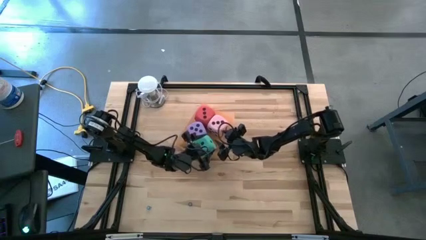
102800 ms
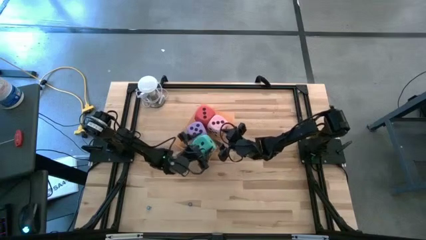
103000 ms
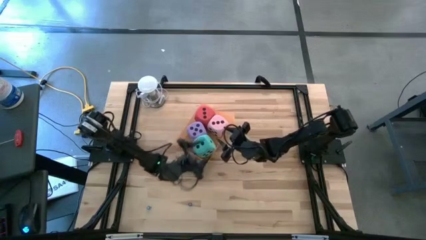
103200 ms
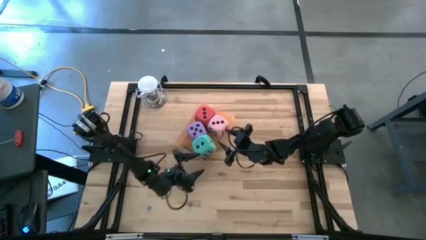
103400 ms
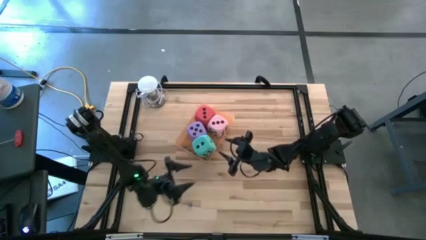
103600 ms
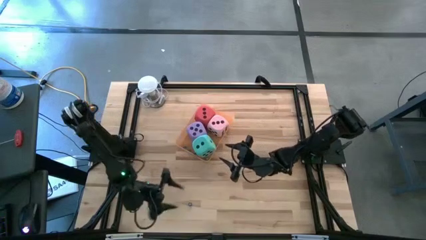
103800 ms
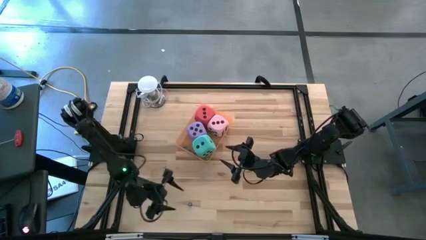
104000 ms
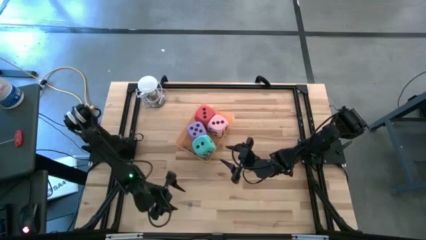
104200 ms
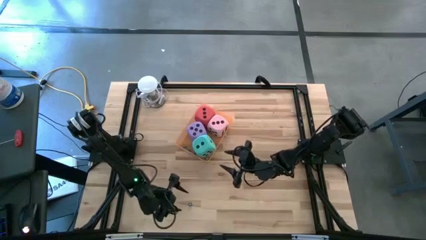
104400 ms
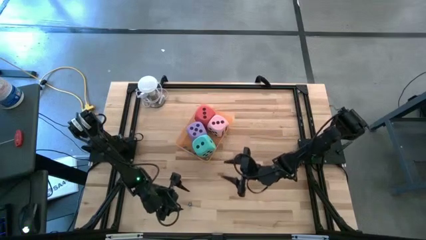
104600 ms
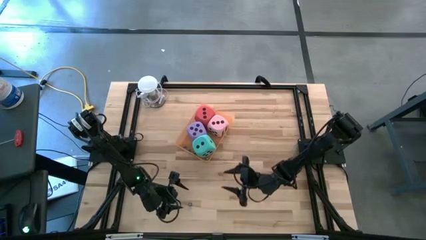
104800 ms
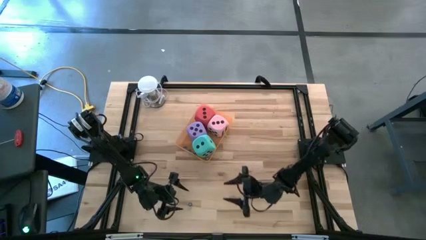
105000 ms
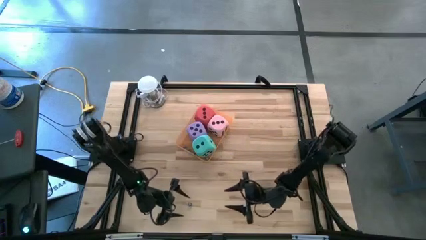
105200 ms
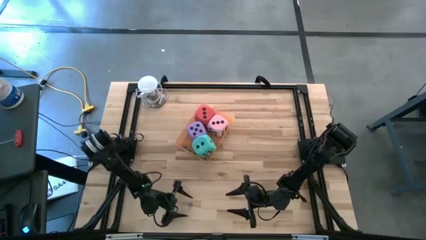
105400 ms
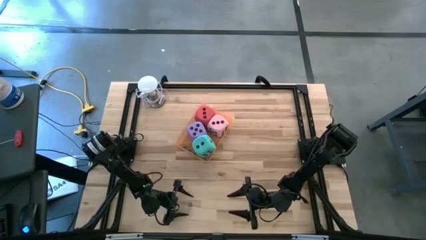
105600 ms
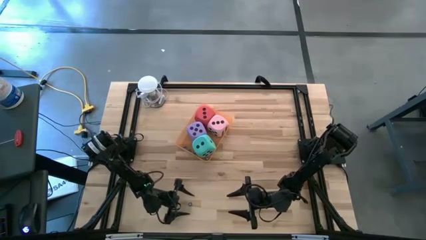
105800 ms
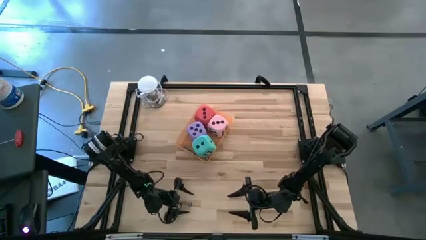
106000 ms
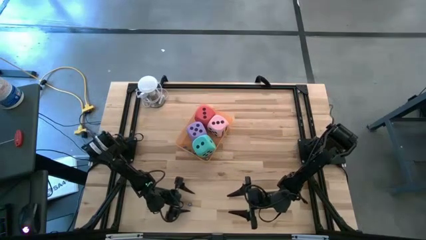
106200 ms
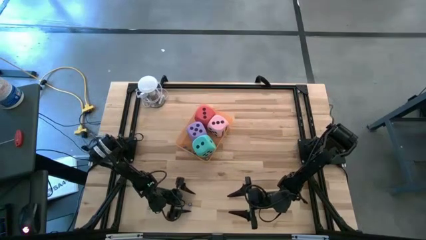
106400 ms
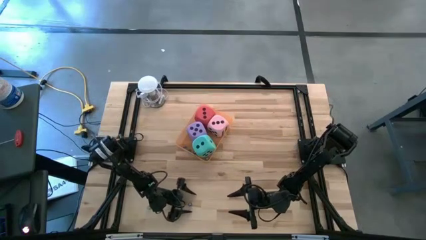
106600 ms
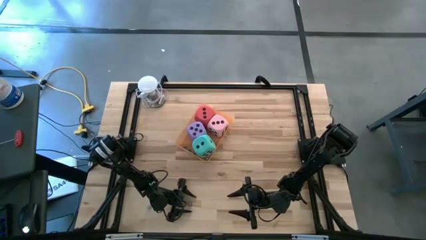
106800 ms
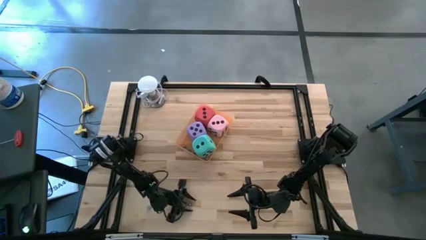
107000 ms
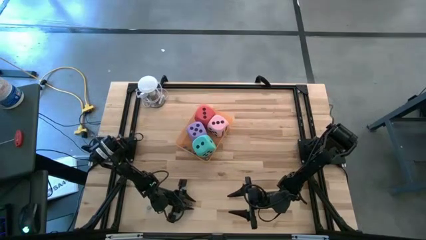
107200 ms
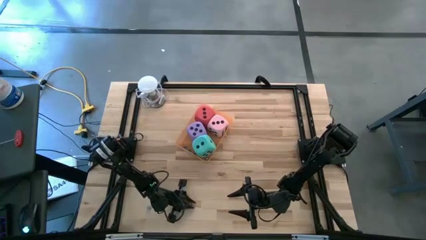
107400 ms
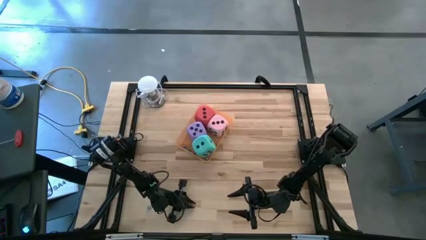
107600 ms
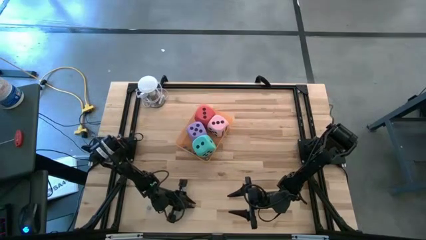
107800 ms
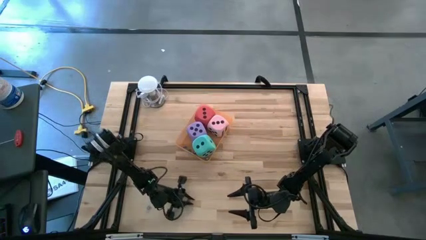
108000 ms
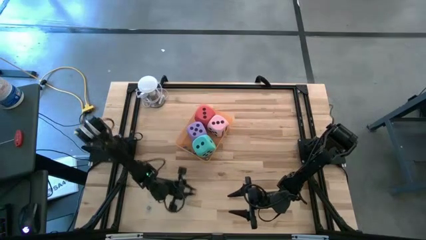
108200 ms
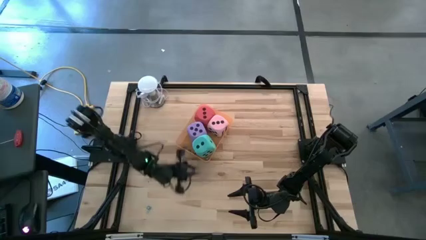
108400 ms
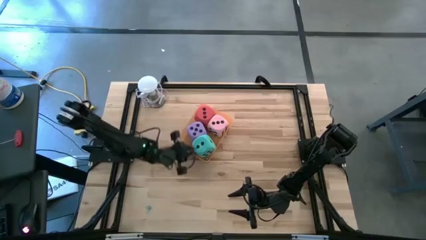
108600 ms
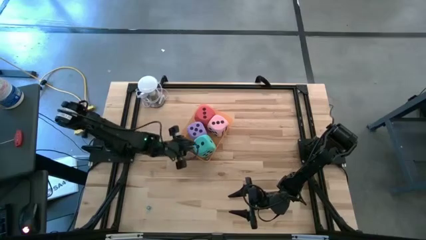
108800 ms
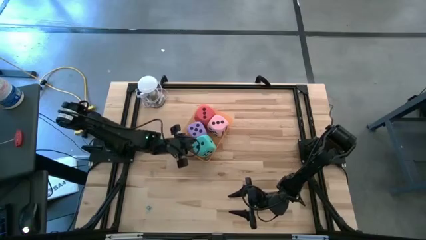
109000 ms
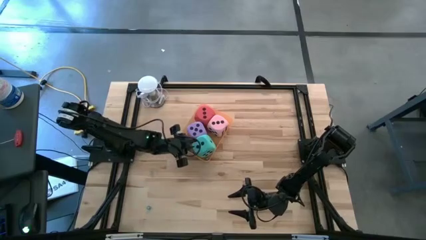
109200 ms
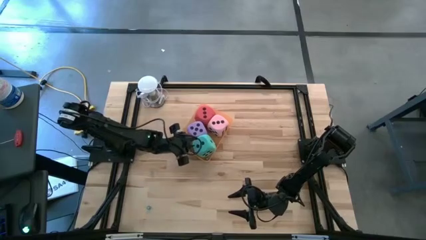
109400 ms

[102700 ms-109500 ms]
Task: Pick & Place Dice
Put the small dark blue die into the orange bin

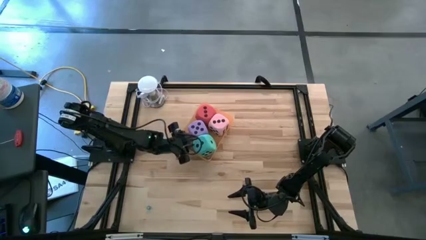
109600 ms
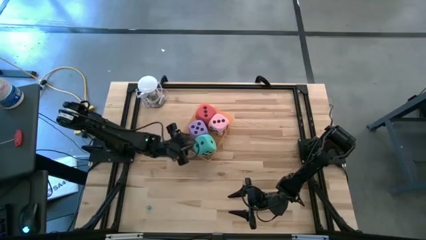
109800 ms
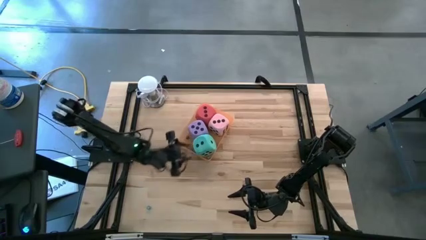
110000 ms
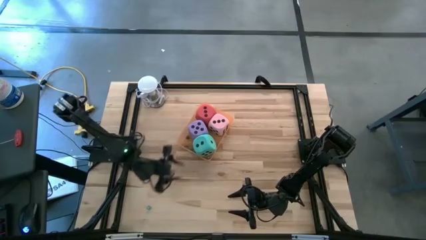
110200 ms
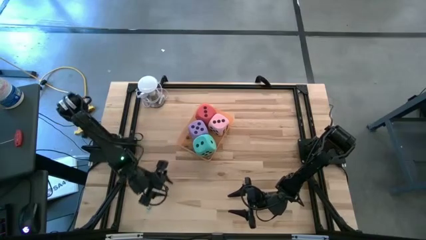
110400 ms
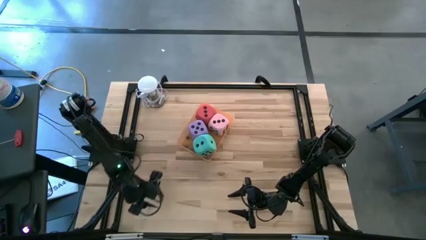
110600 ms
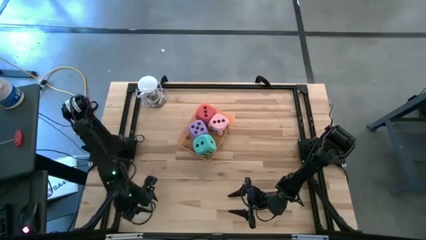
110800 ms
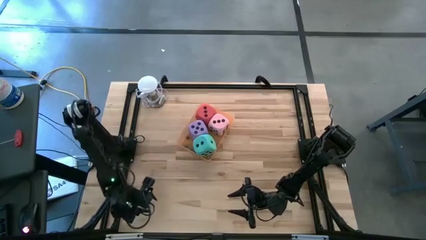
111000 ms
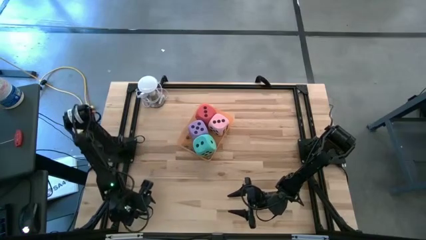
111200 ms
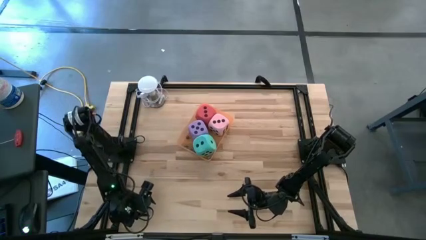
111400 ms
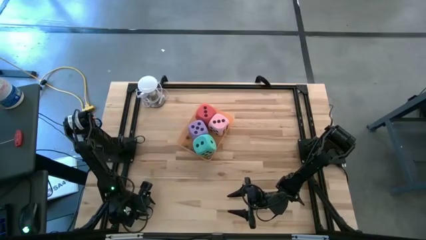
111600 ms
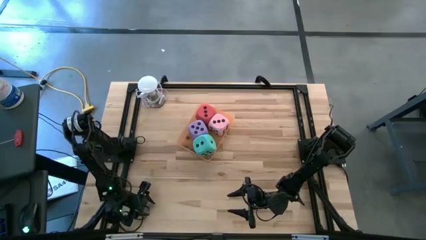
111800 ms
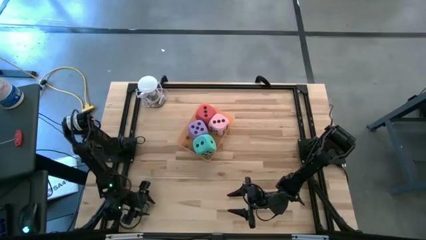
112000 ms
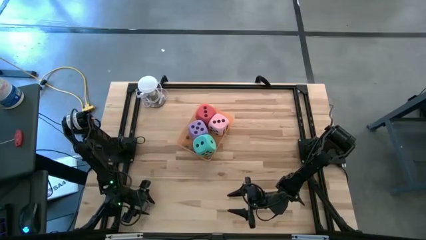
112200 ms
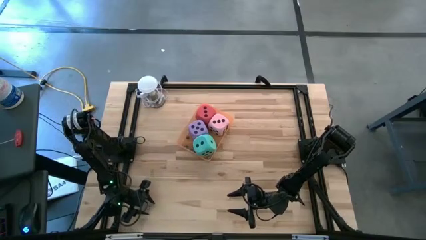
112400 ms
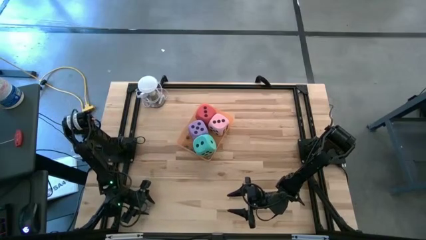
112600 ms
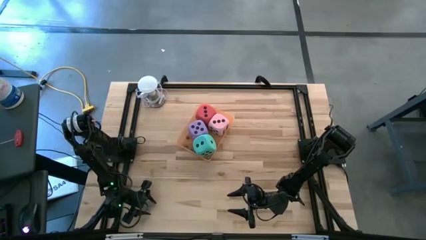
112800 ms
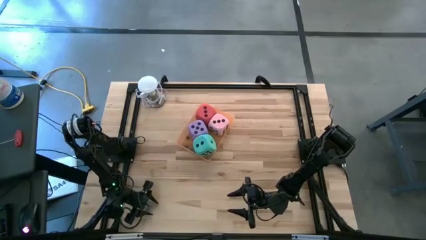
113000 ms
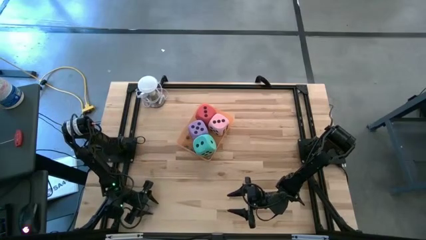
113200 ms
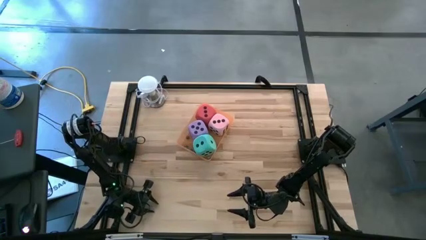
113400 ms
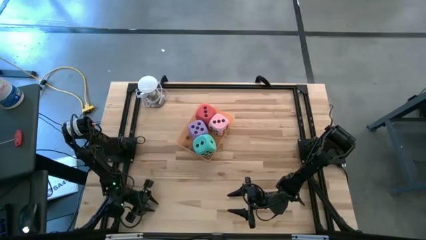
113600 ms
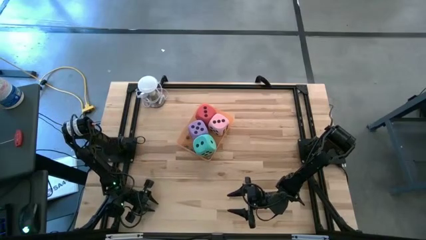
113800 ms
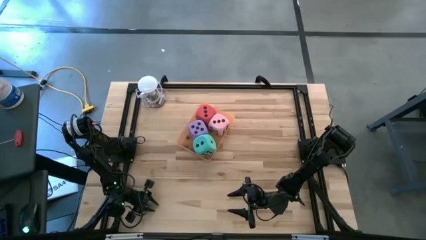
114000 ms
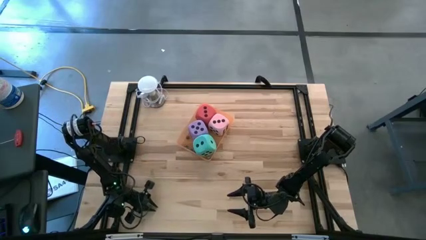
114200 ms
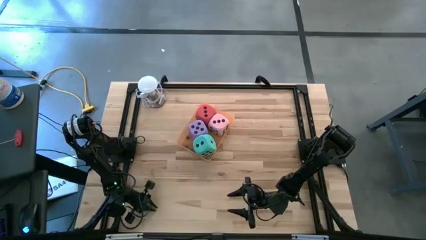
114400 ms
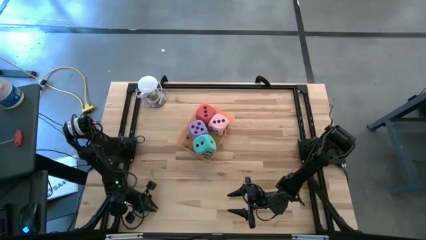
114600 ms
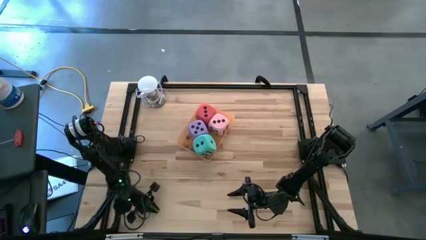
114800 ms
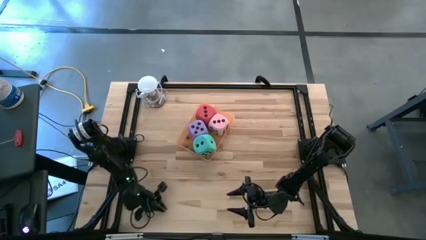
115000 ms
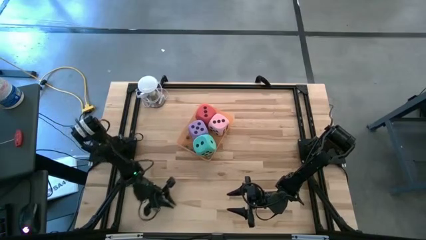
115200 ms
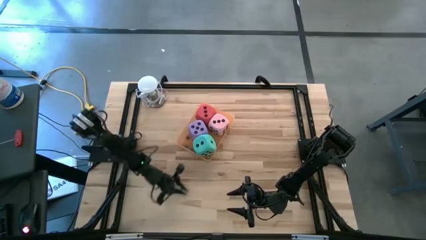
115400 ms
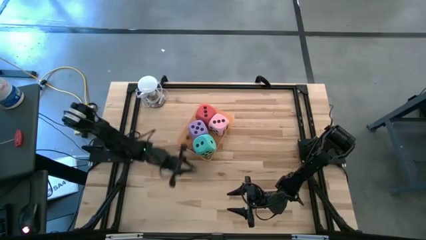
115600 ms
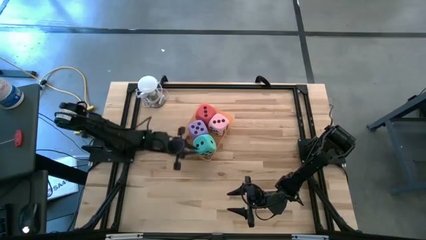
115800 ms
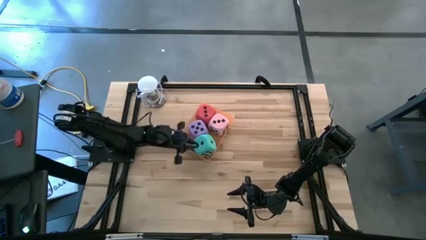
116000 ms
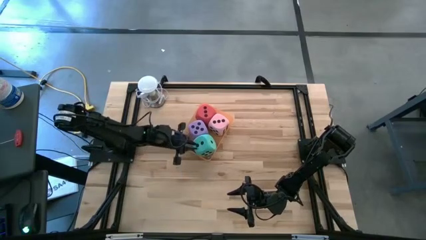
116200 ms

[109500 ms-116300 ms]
Put the small blue die into the orange bin

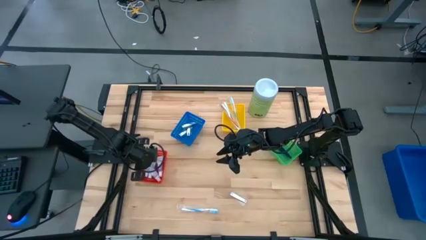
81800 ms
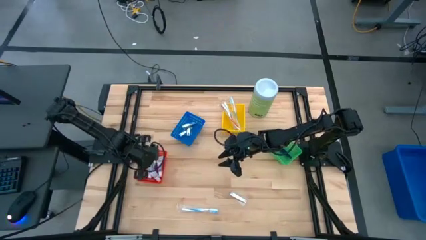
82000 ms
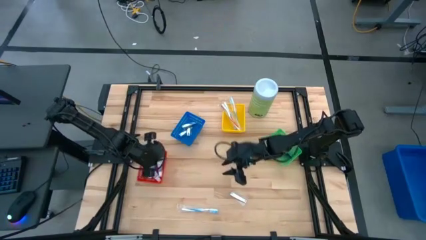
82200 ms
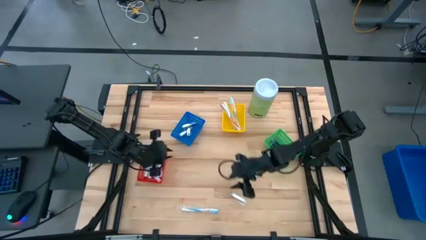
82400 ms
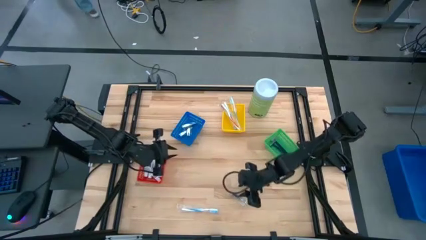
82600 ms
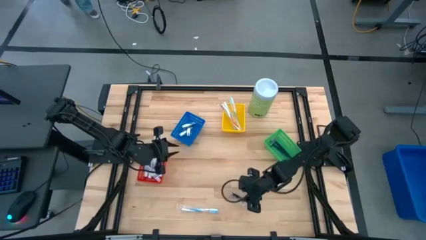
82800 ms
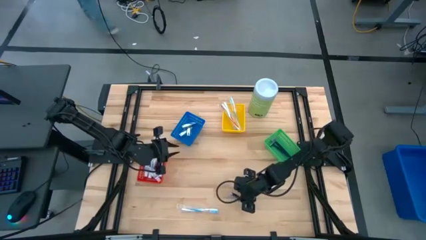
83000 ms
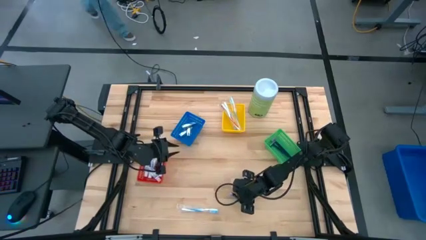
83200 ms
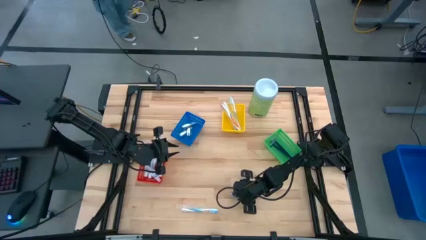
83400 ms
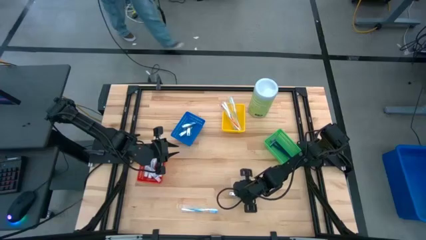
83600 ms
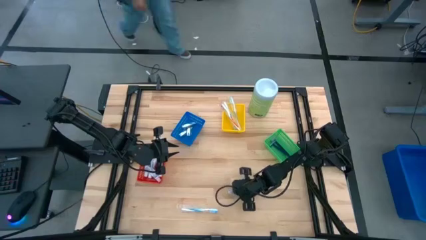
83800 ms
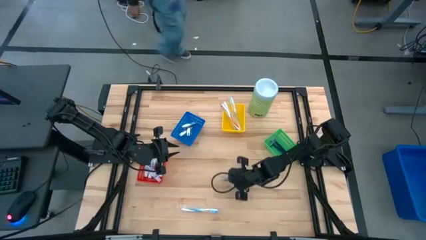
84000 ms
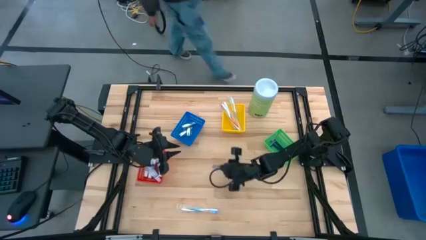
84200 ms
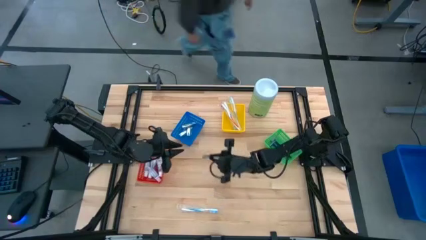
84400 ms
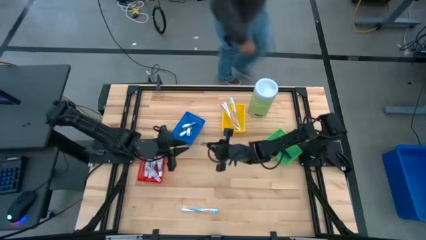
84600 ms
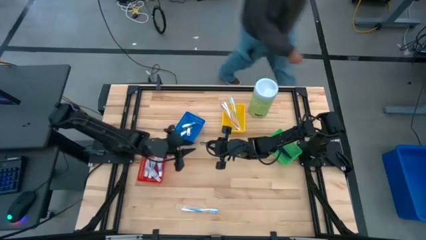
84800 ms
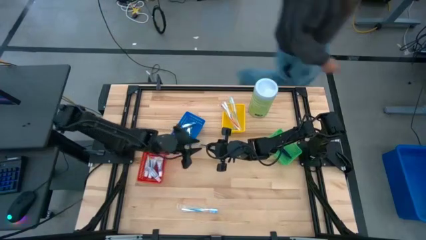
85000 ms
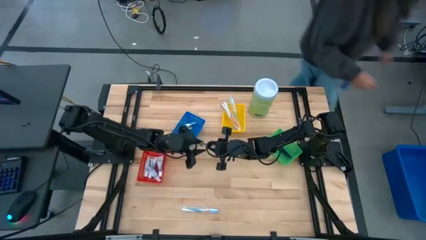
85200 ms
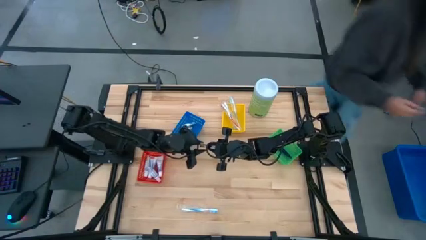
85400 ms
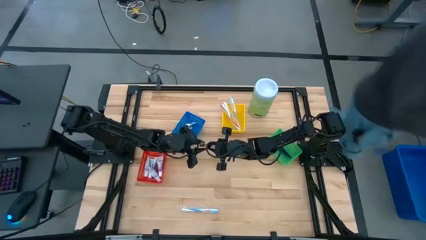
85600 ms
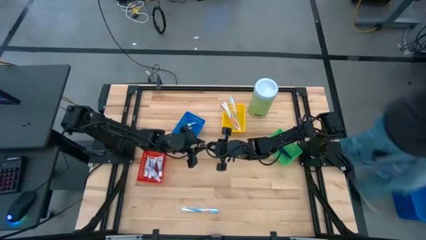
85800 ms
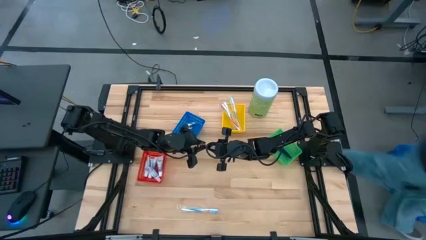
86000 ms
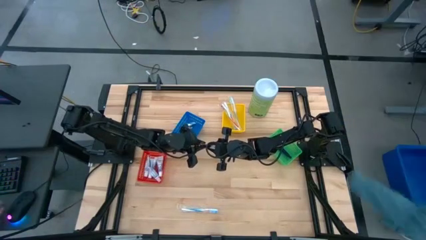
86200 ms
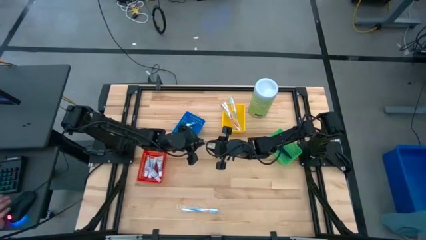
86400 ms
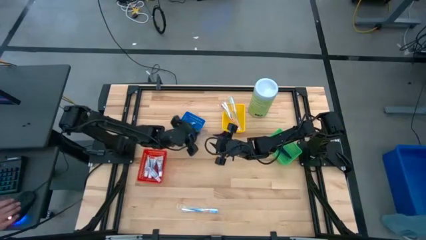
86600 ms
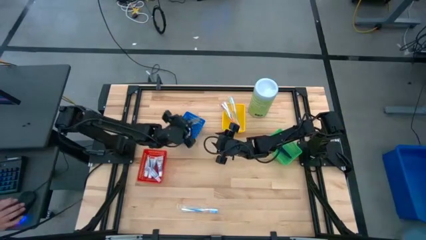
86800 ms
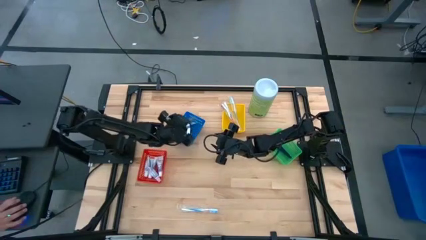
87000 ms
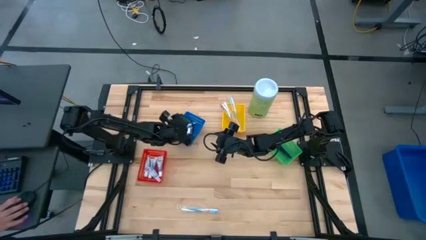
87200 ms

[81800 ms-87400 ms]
Task: Pick & Place Travel size toiletries
Put the silver nail cutter into the blue basket
